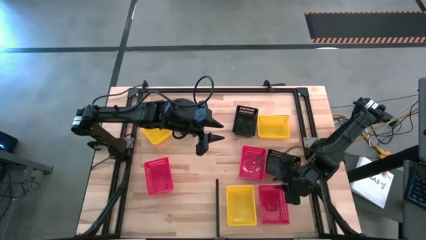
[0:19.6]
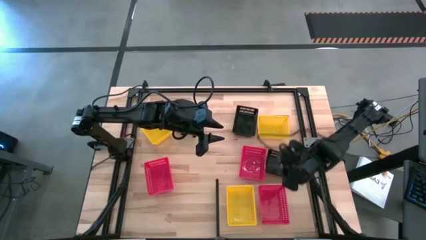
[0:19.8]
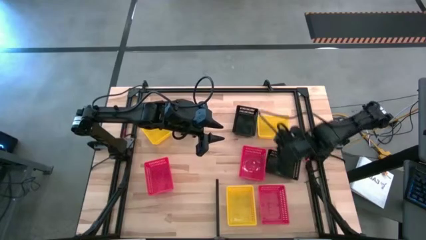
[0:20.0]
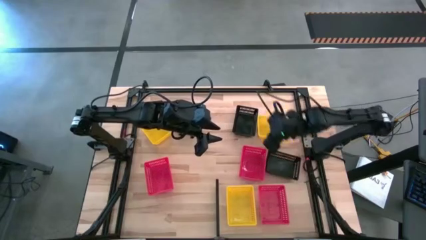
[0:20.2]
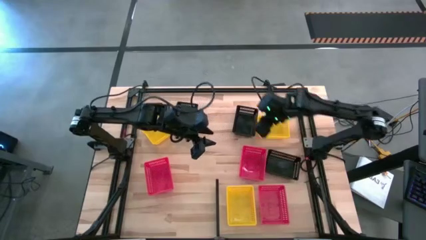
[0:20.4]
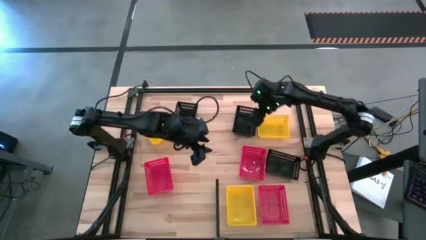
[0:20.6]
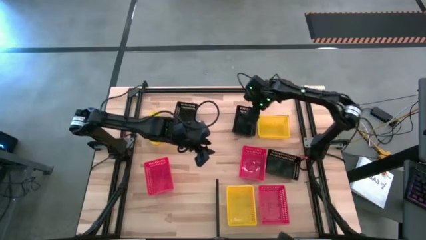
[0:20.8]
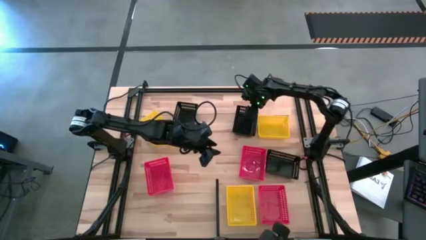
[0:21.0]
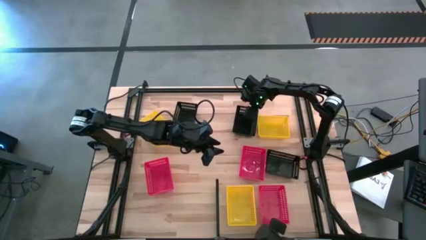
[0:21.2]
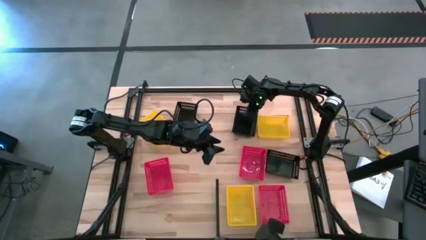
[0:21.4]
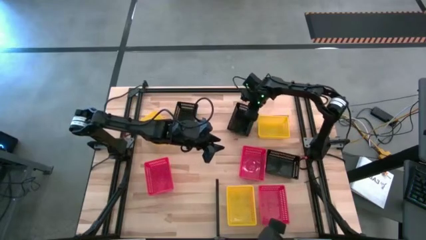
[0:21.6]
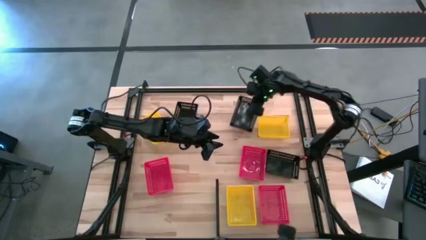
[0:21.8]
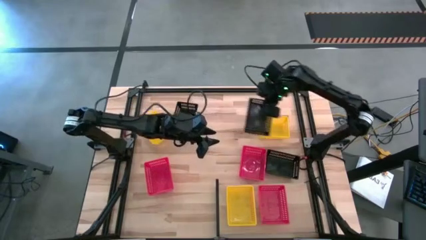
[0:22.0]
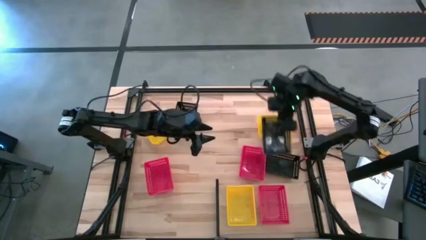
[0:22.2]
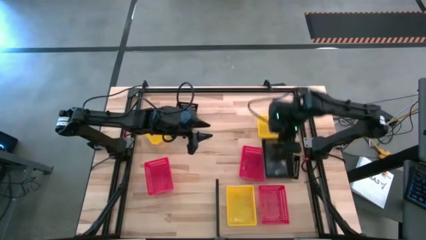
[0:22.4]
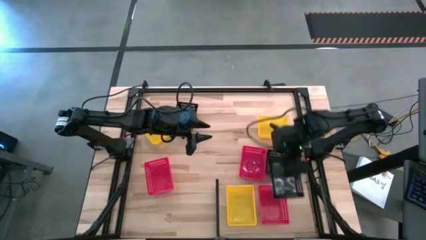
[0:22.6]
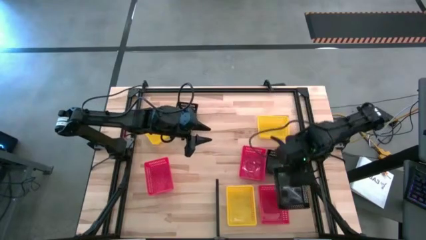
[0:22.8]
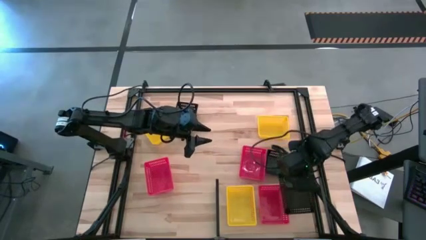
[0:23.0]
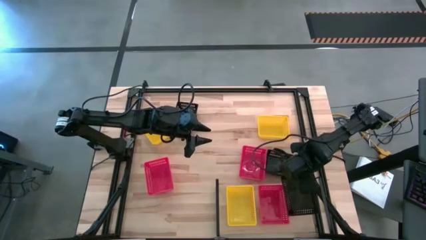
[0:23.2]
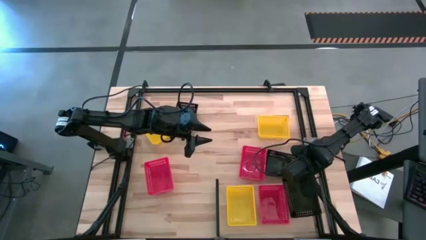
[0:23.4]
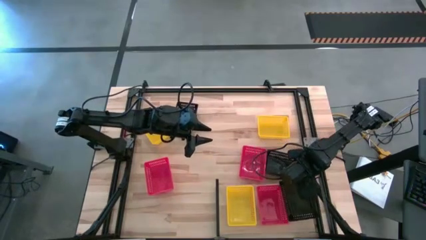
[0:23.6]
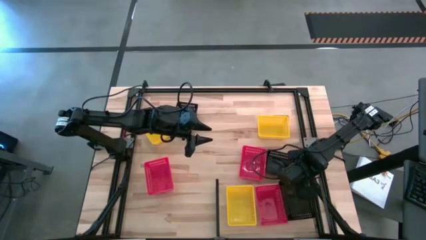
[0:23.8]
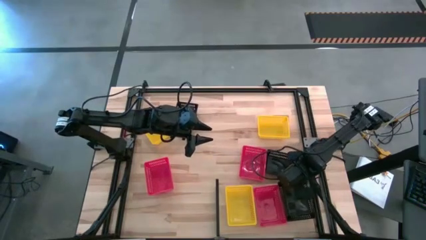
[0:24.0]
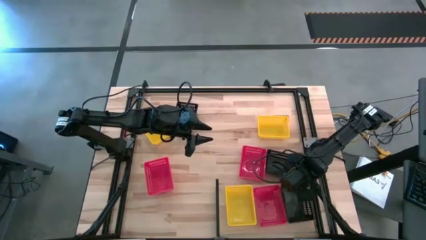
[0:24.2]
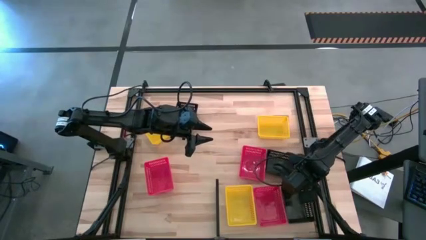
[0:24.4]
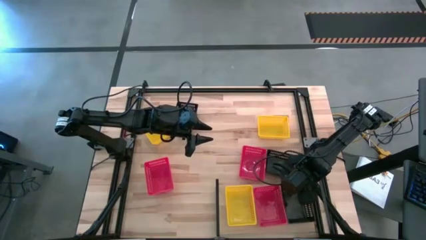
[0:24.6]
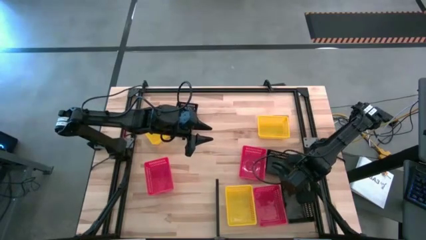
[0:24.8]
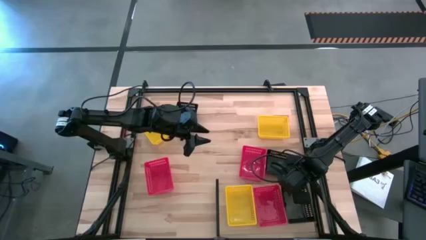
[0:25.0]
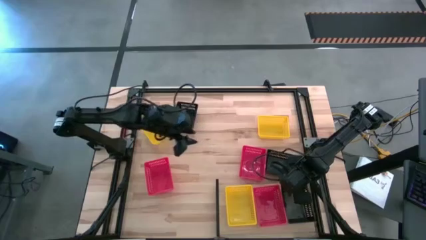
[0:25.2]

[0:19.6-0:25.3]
Task: Stack baskets on shelf by color
Put the top right black bin on the shelf

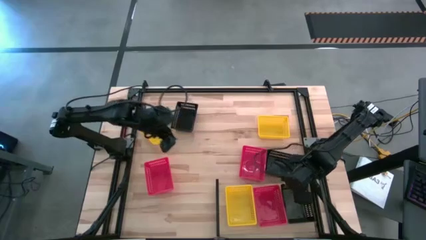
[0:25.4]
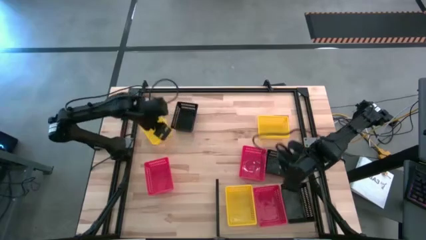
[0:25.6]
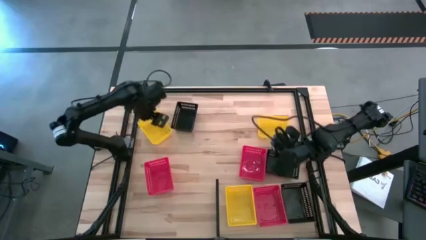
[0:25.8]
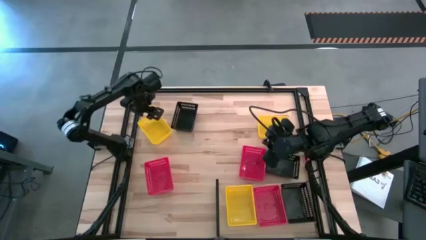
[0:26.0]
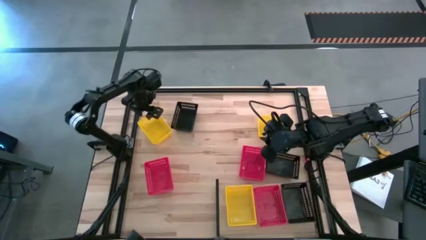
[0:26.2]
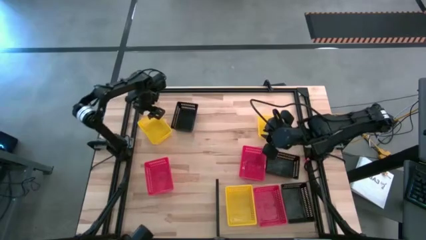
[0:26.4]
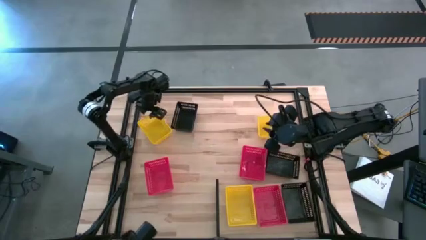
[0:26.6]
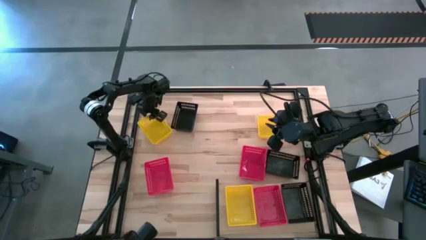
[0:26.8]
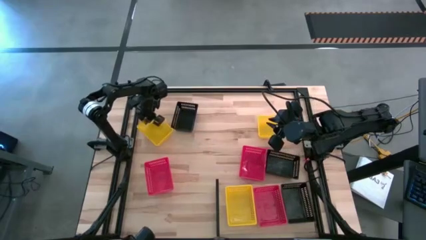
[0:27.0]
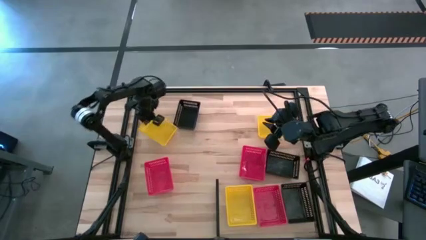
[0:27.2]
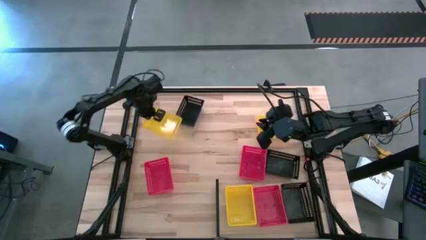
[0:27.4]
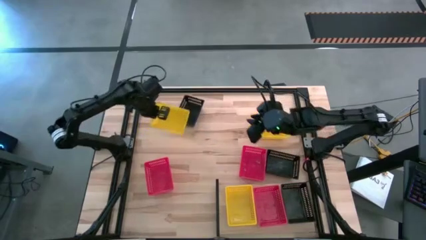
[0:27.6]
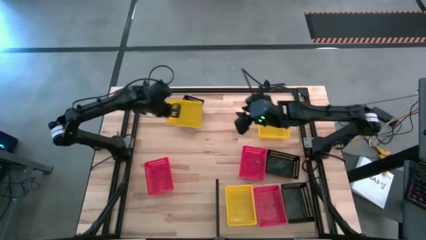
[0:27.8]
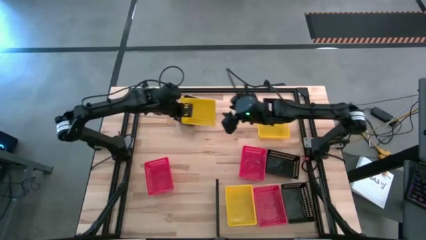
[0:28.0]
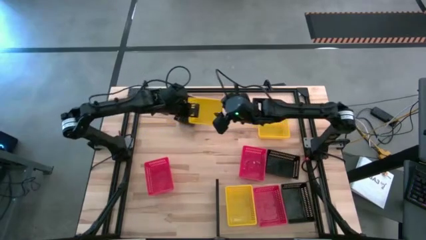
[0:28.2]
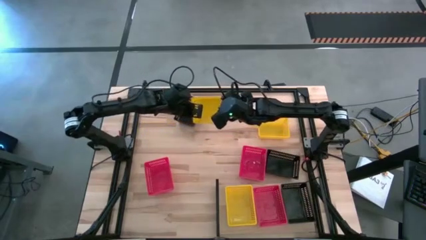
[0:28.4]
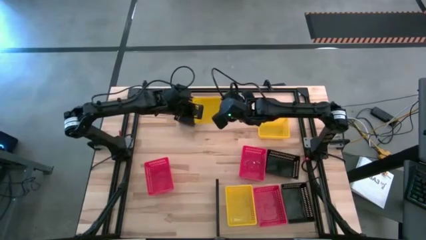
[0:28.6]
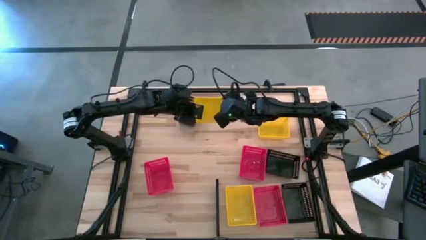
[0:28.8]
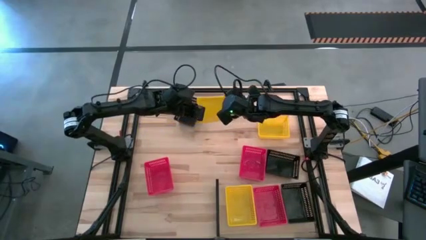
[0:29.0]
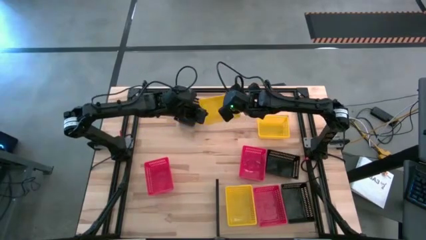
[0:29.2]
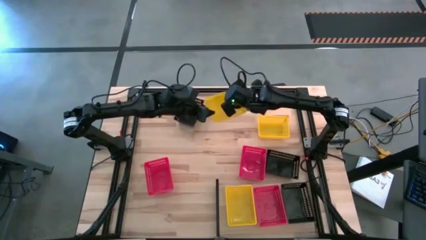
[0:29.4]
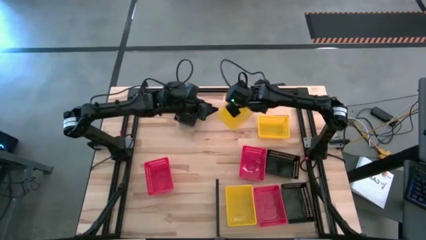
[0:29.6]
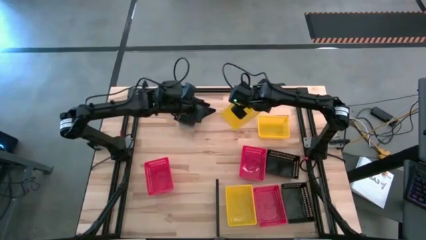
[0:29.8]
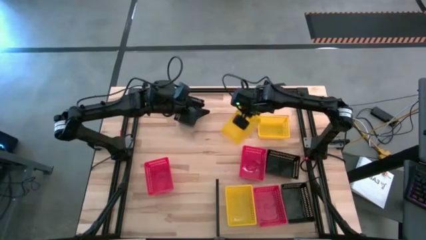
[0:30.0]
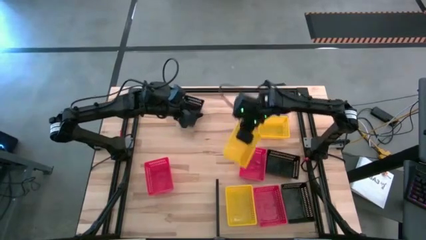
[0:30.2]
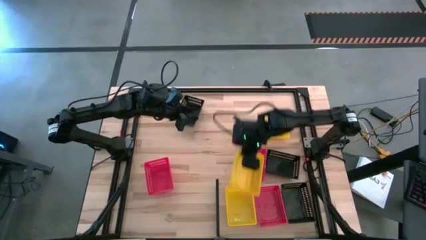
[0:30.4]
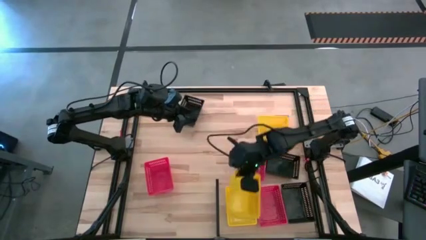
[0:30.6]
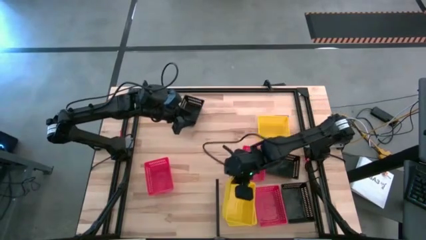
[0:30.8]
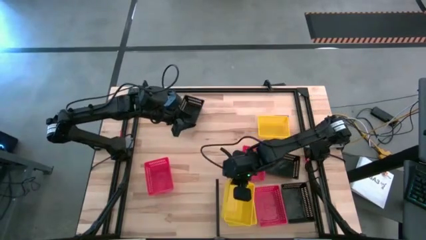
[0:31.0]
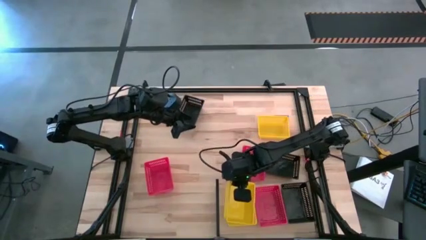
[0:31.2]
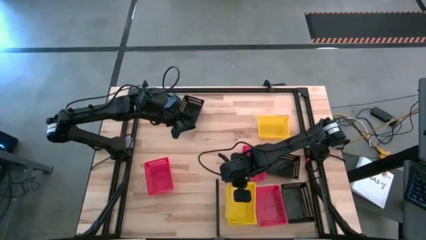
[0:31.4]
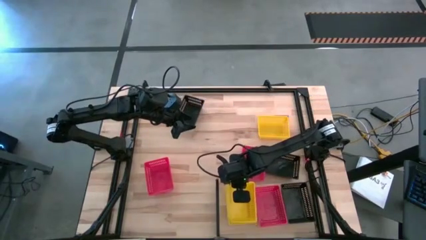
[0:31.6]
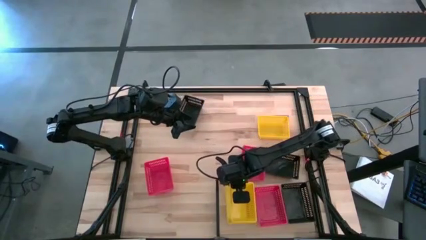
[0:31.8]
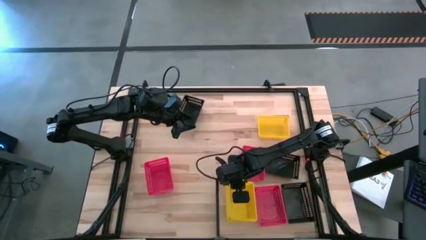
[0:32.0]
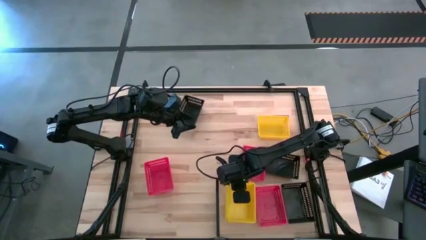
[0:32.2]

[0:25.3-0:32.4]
Stack the left yellow bin on top of the yellow bin on the shelf

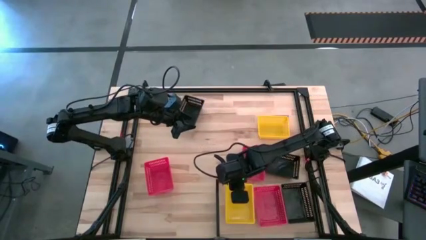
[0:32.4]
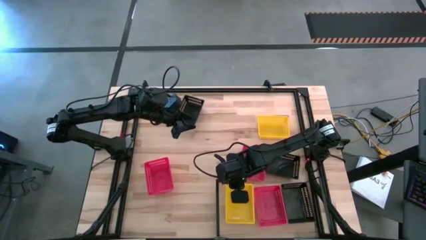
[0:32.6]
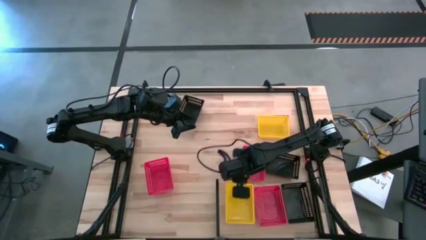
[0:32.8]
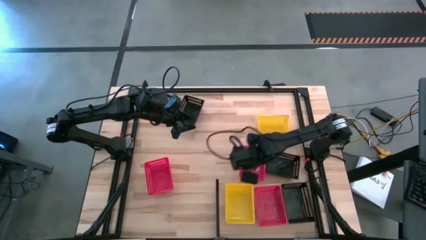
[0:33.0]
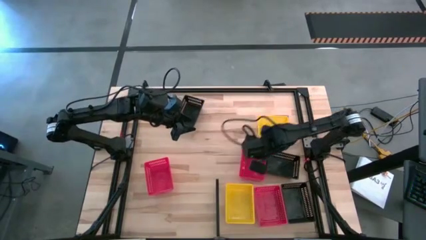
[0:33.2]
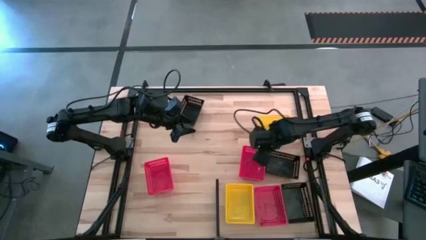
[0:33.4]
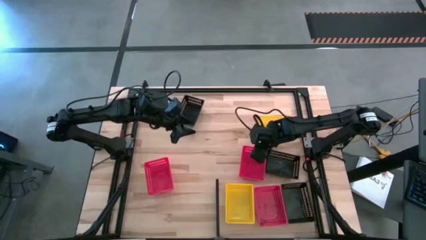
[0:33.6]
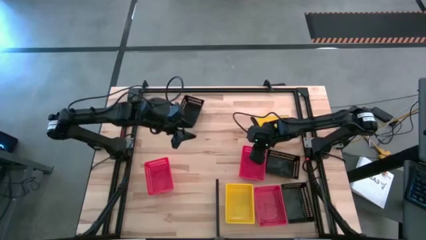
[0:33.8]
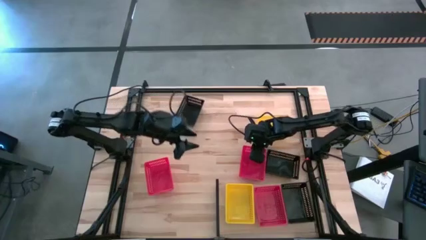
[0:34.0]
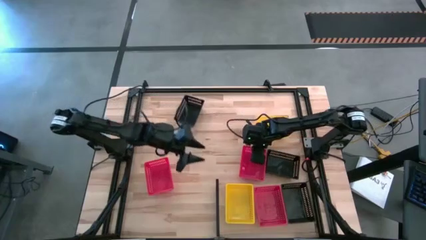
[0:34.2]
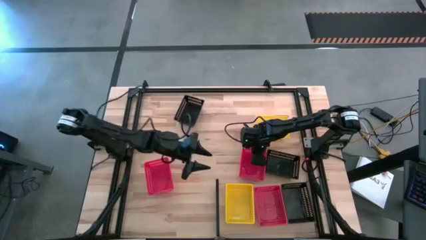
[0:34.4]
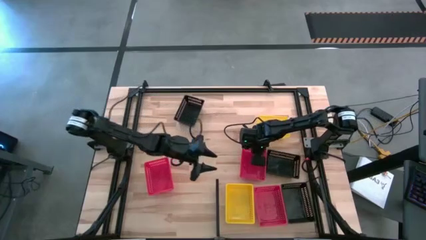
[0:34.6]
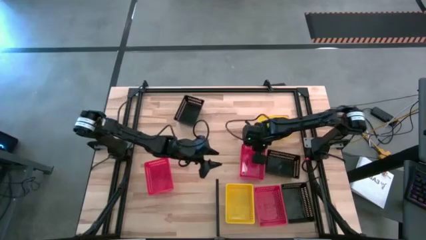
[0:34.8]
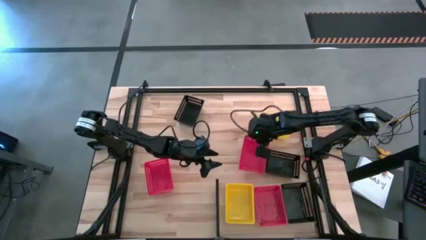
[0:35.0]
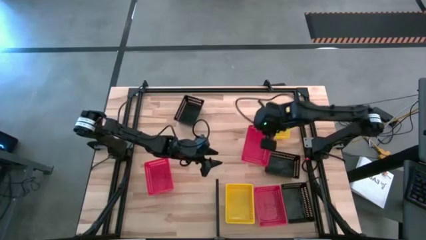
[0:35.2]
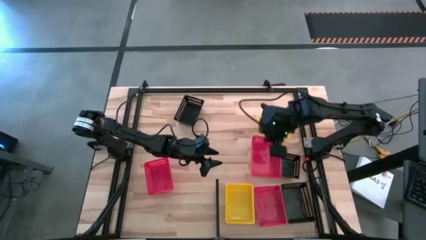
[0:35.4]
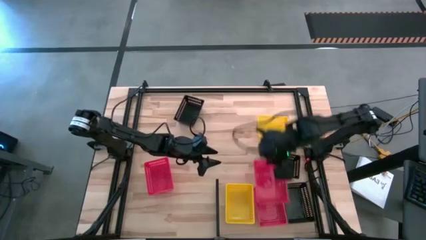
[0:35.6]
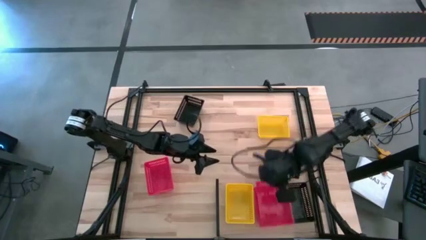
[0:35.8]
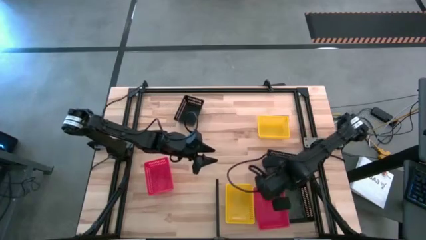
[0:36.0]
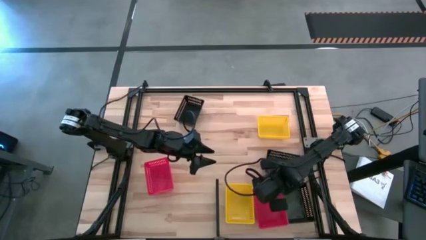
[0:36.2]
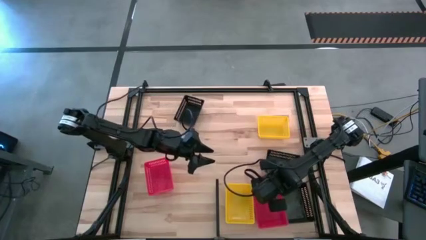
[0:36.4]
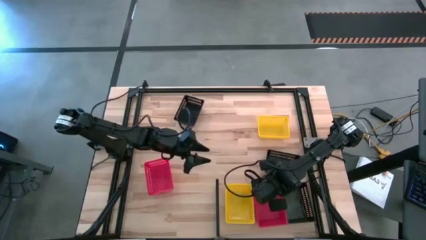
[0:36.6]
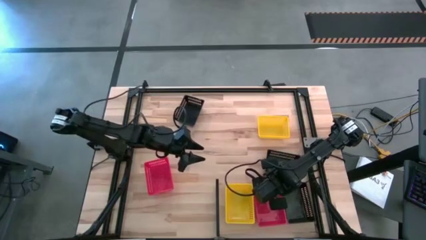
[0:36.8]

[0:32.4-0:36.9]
Stack the right red bin on top of the red bin on the shelf
